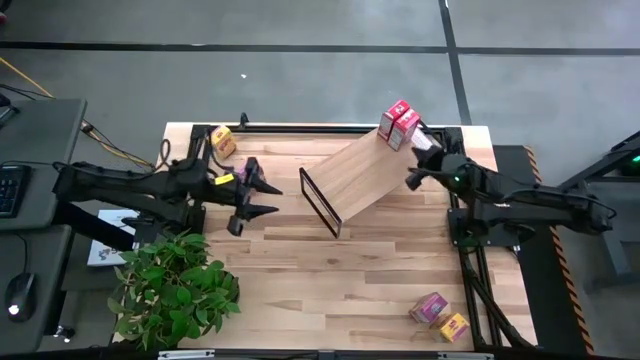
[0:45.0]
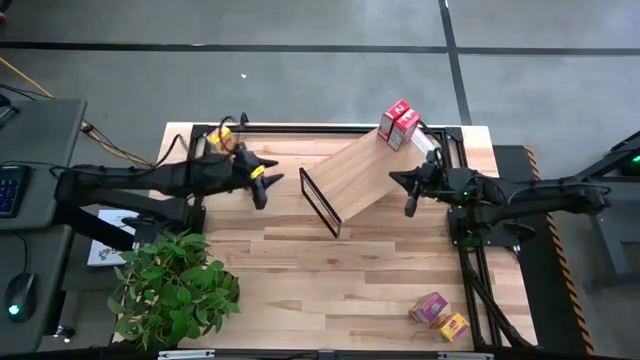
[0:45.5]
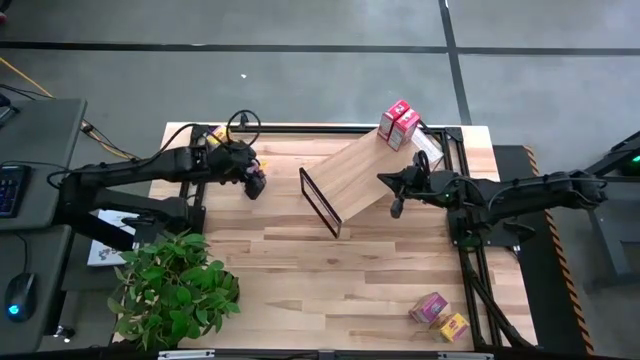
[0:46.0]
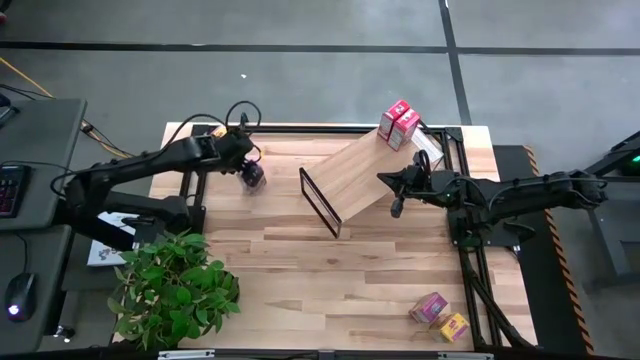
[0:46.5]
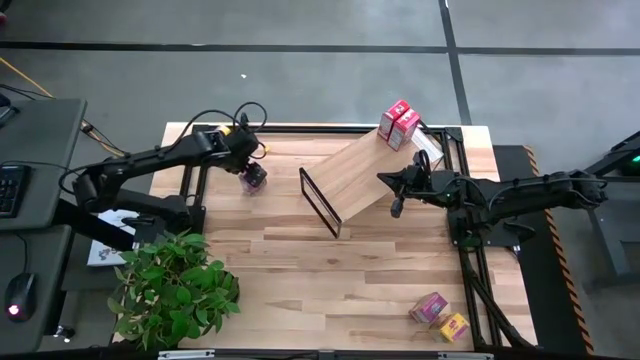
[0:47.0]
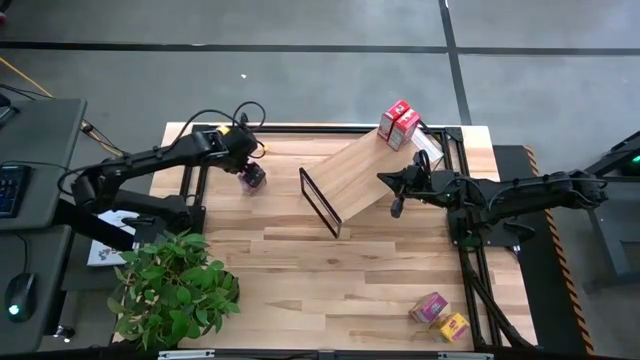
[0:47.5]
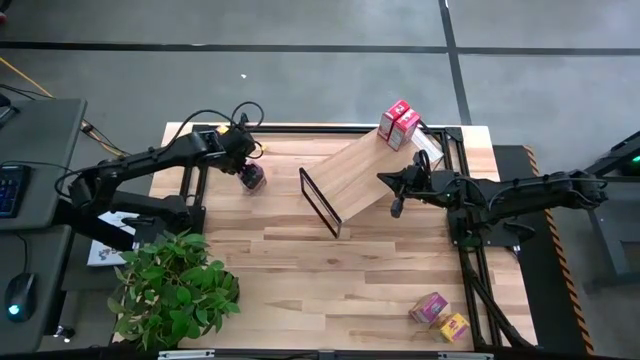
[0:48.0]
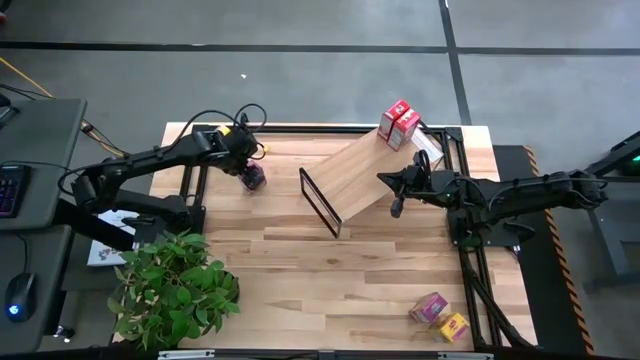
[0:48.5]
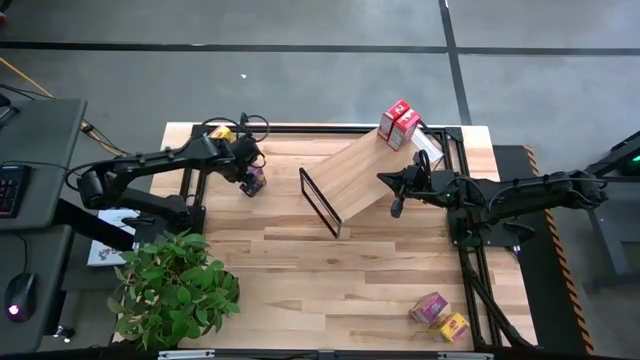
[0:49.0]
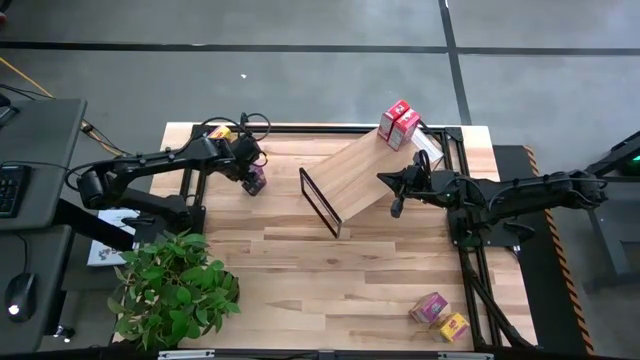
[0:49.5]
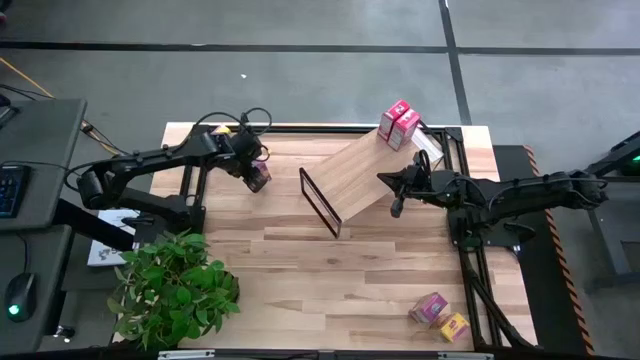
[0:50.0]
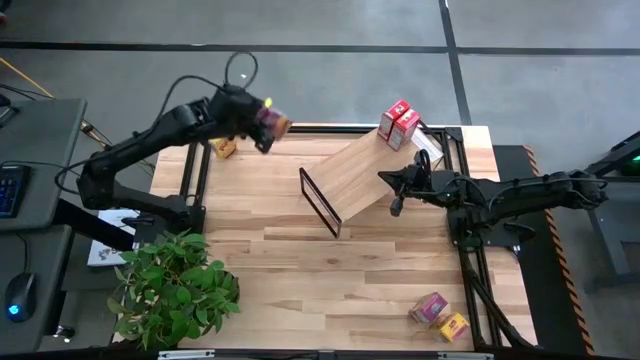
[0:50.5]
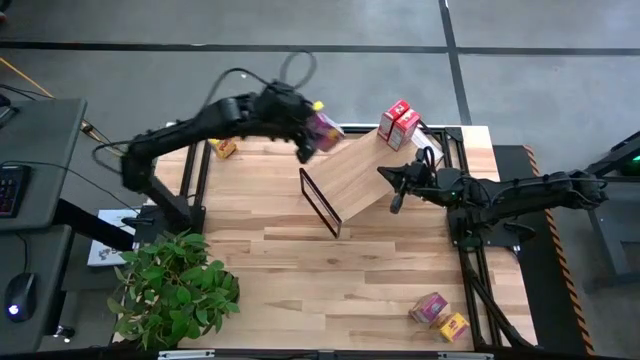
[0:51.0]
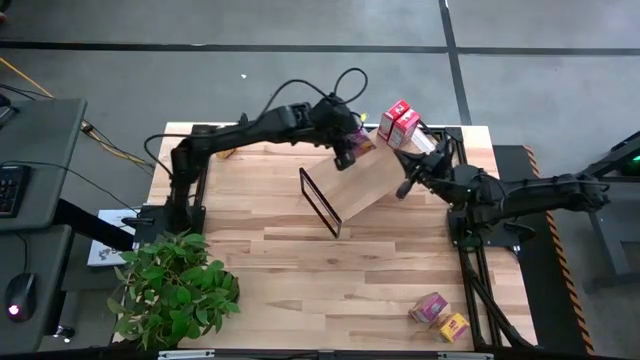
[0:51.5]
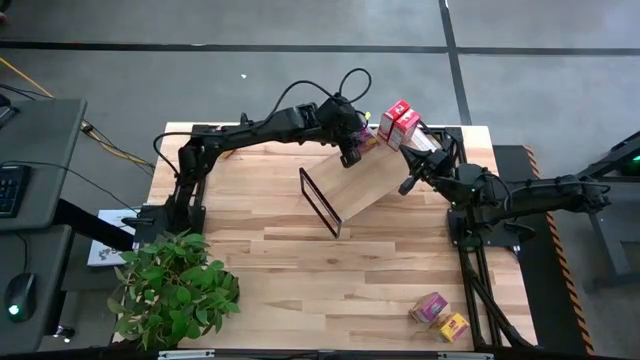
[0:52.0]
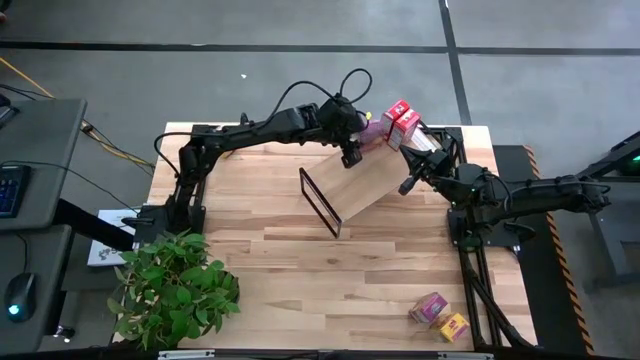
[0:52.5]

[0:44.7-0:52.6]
Task: Stack cereal on shelf
Put the top purple cereal box on the shelf

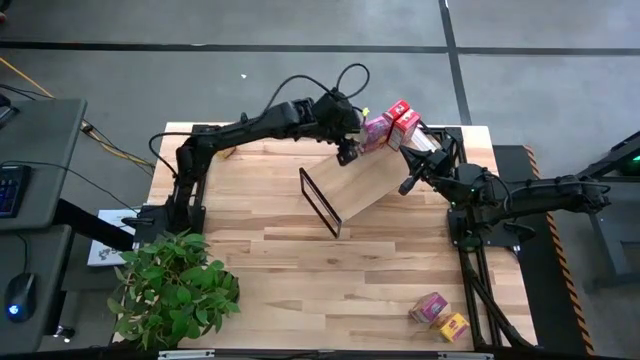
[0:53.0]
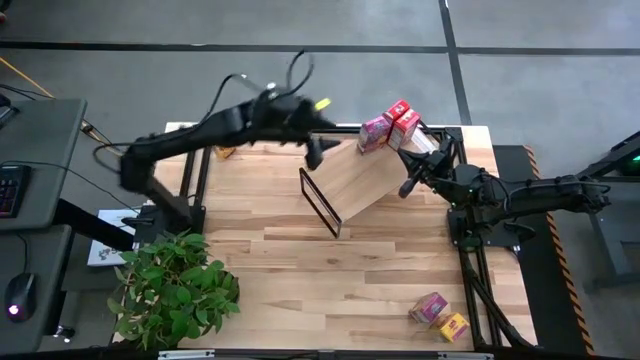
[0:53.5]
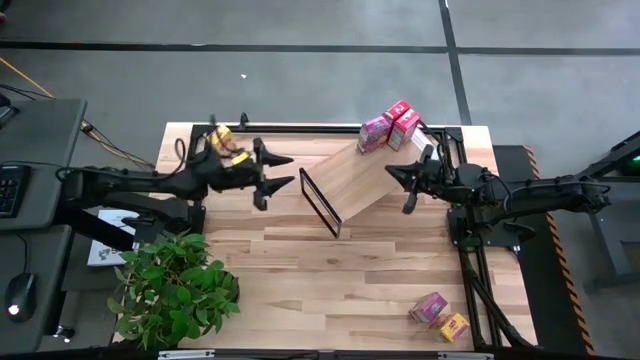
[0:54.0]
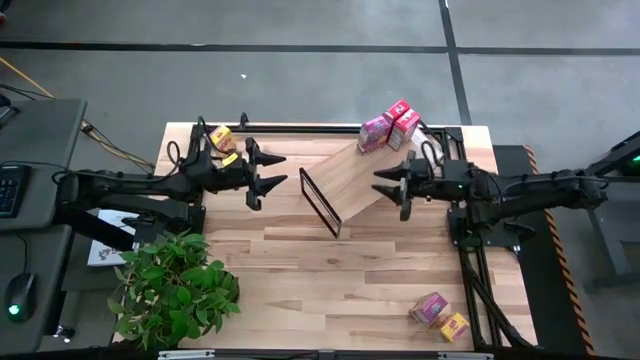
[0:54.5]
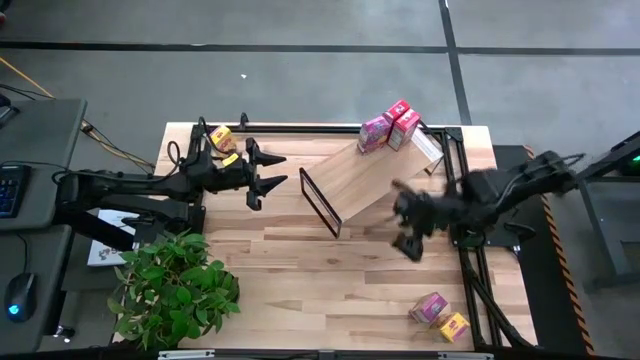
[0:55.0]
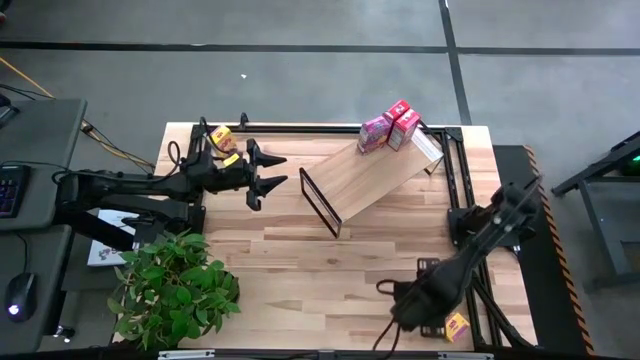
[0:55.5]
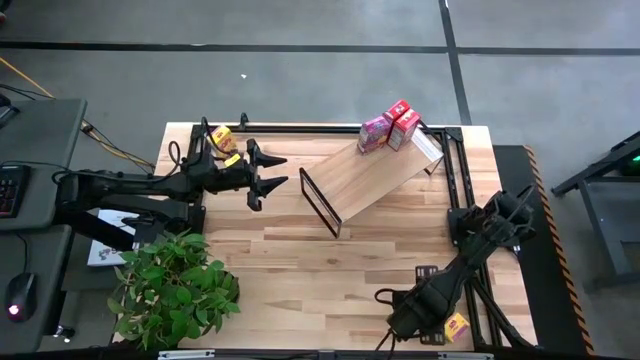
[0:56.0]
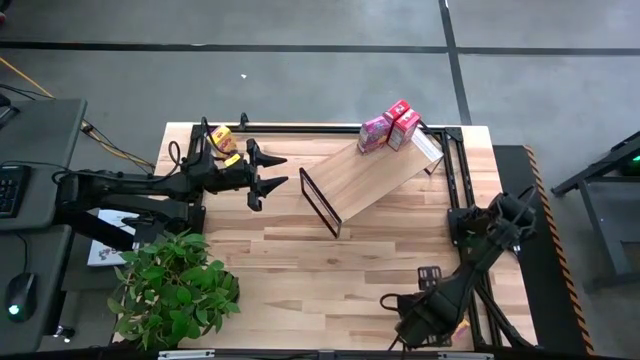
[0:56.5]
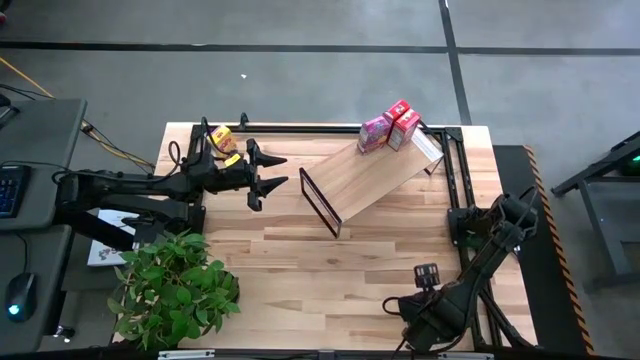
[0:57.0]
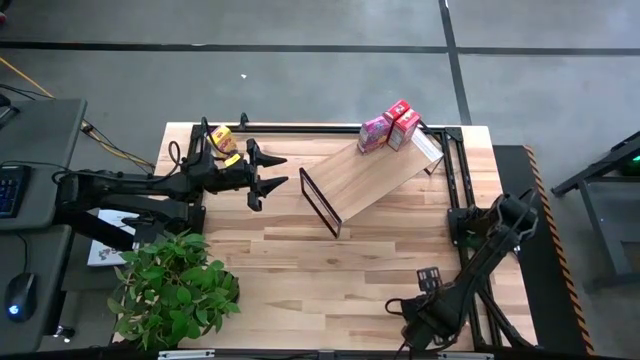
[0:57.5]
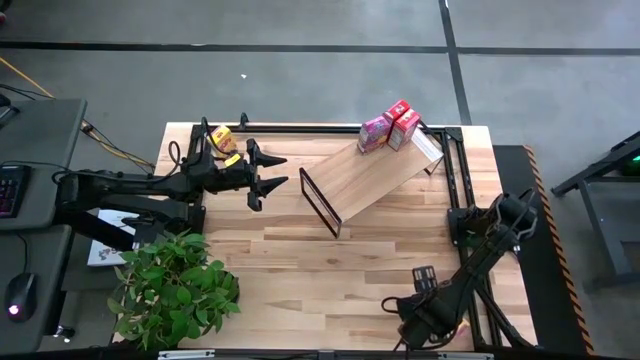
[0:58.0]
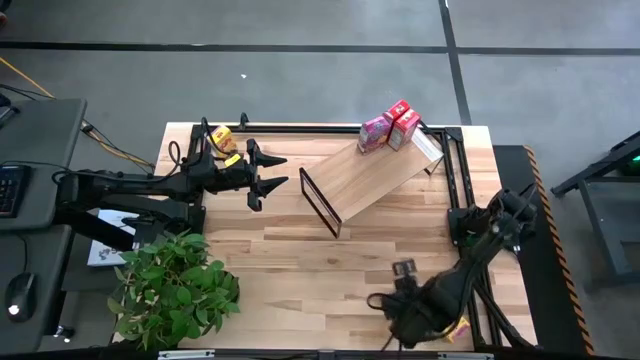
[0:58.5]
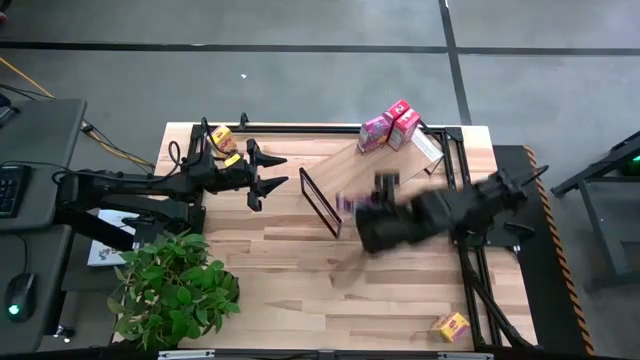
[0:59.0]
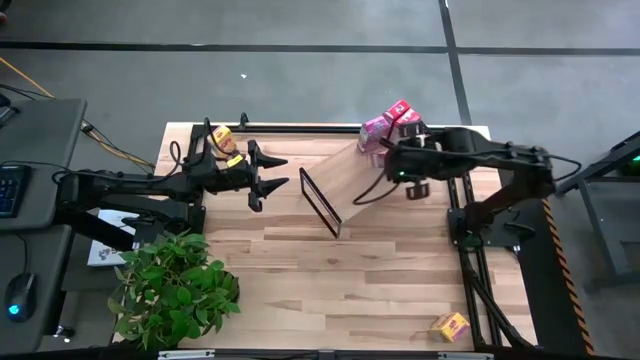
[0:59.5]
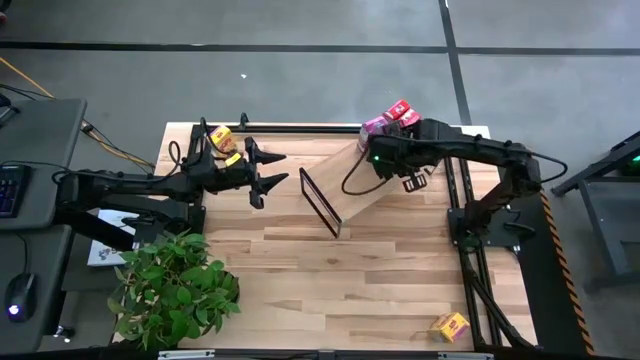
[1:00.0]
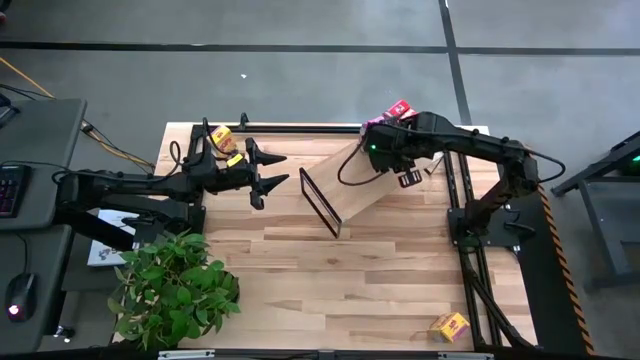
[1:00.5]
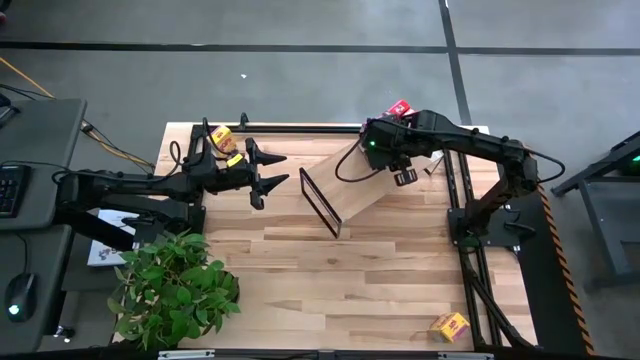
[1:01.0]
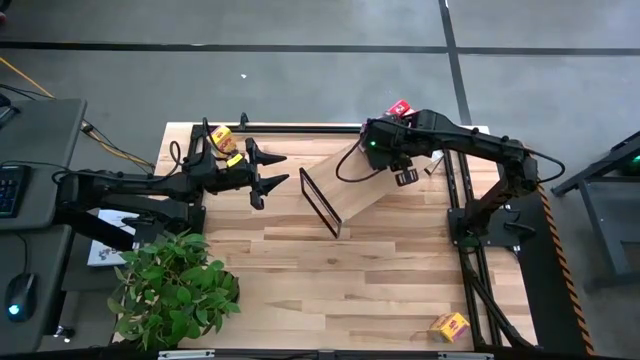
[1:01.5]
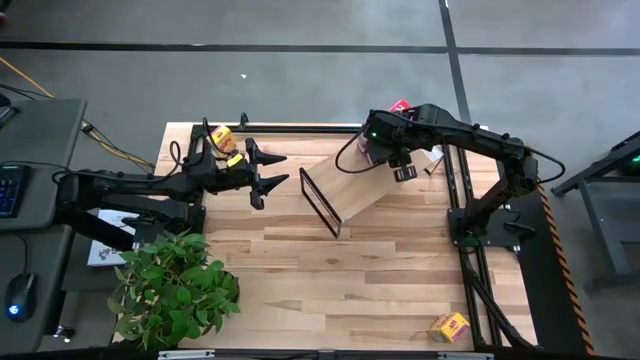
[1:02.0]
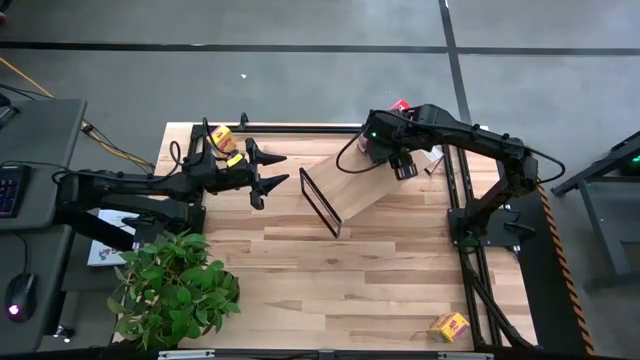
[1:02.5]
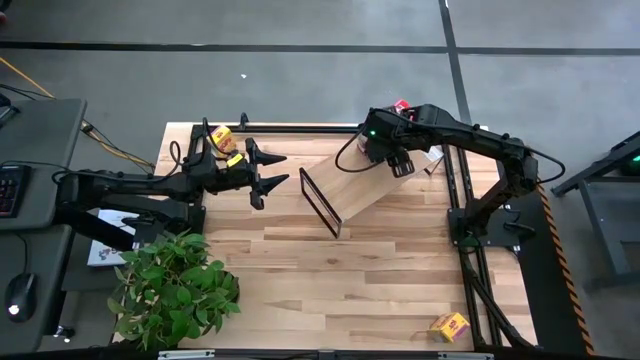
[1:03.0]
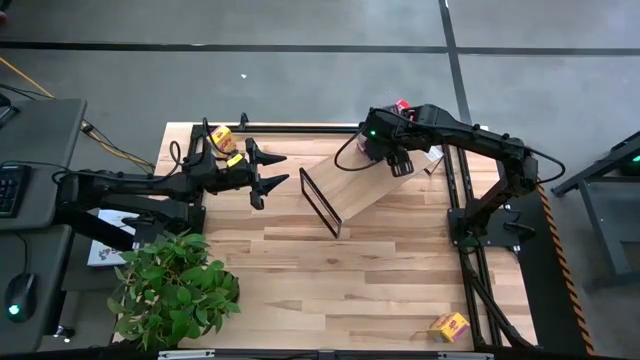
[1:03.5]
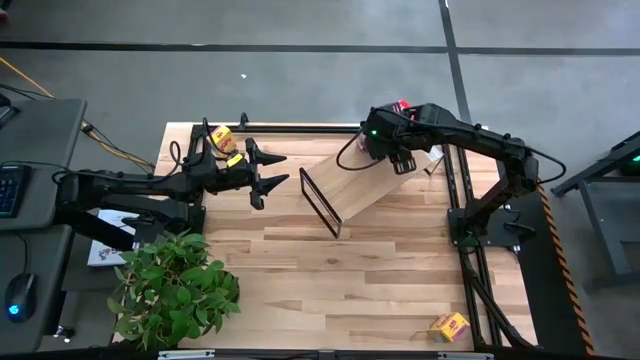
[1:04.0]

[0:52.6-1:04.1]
Put the purple cereal box on the shelf aligned with the other purple cereal box
